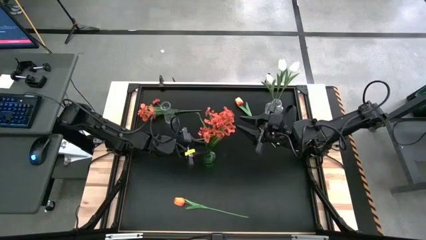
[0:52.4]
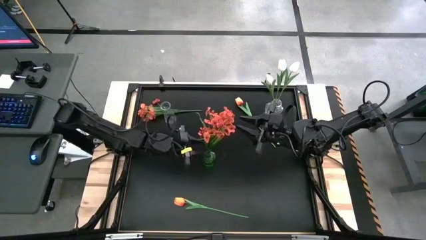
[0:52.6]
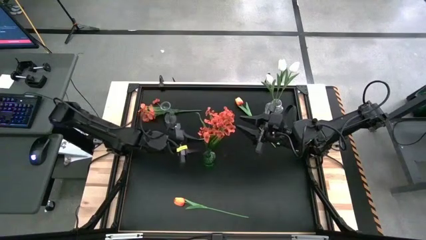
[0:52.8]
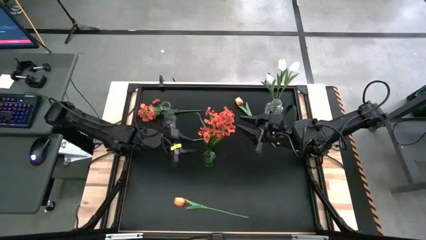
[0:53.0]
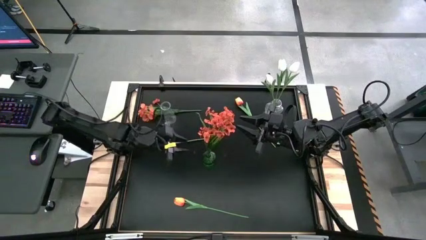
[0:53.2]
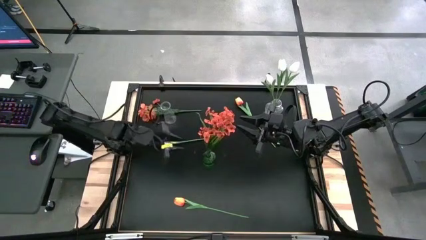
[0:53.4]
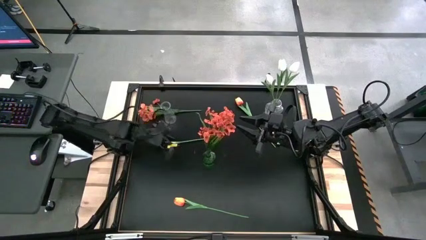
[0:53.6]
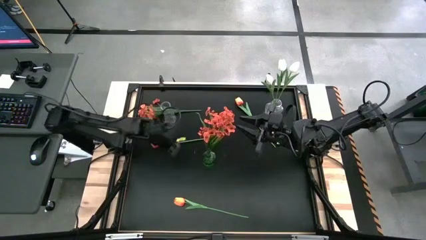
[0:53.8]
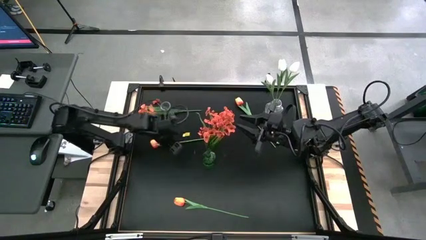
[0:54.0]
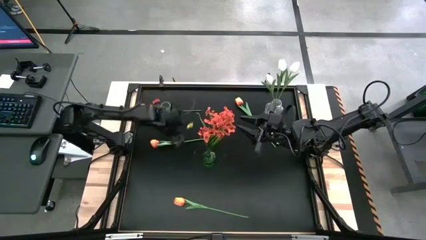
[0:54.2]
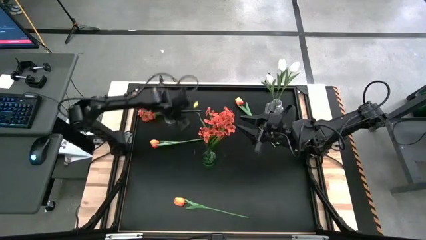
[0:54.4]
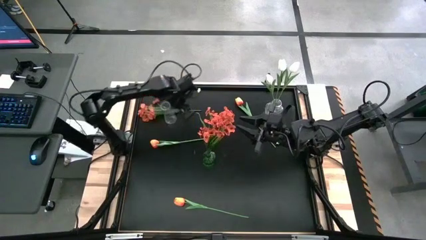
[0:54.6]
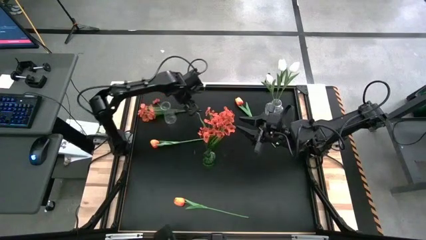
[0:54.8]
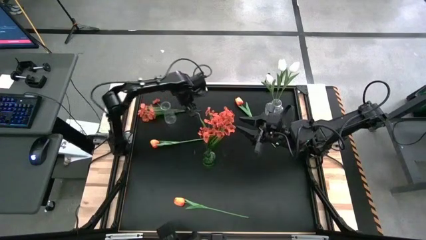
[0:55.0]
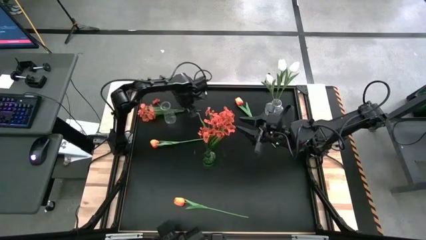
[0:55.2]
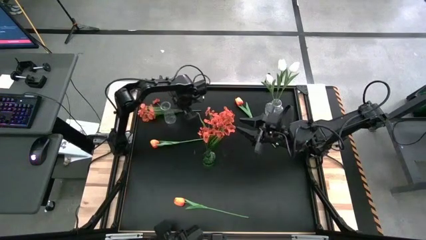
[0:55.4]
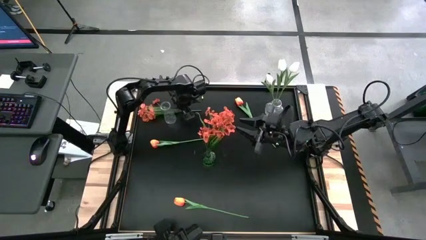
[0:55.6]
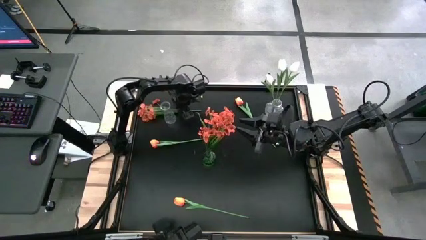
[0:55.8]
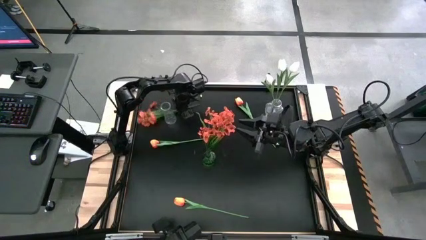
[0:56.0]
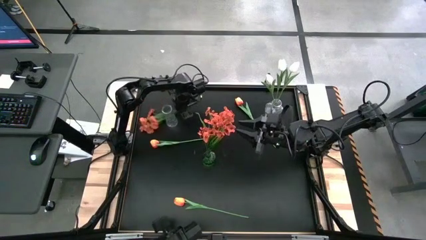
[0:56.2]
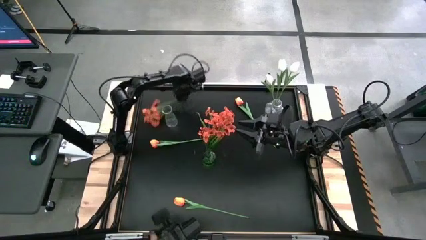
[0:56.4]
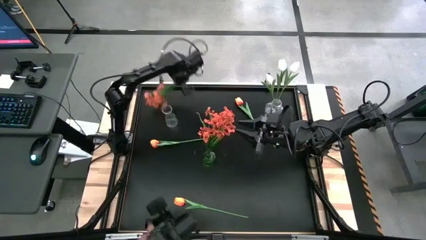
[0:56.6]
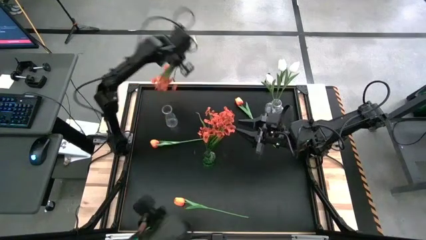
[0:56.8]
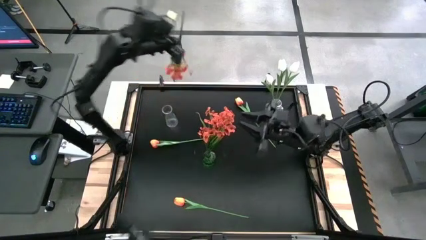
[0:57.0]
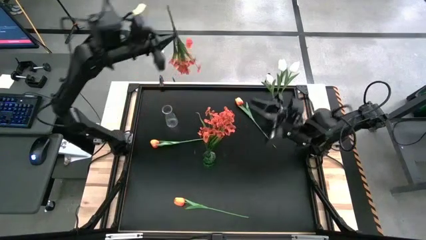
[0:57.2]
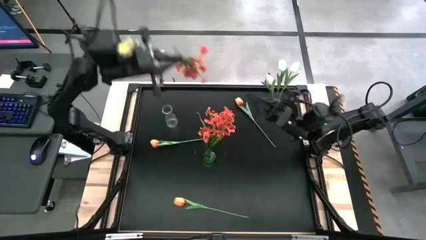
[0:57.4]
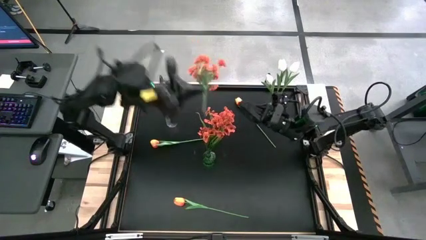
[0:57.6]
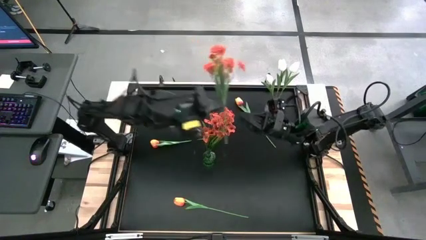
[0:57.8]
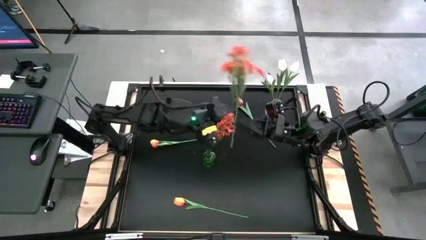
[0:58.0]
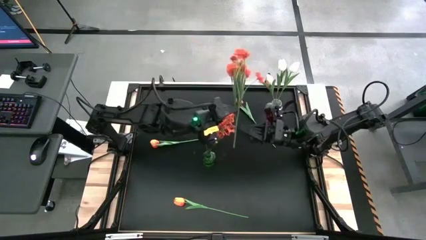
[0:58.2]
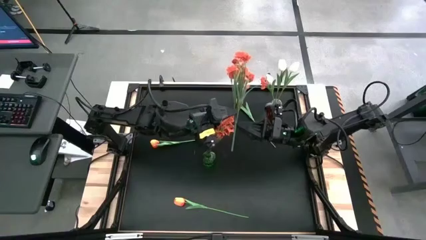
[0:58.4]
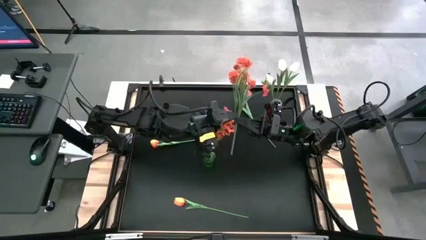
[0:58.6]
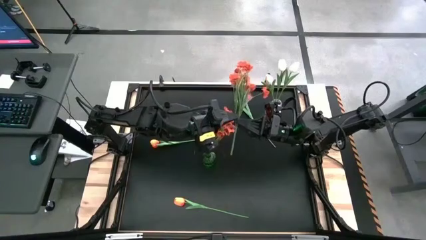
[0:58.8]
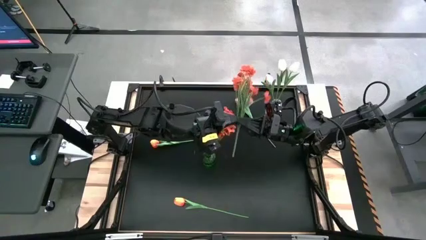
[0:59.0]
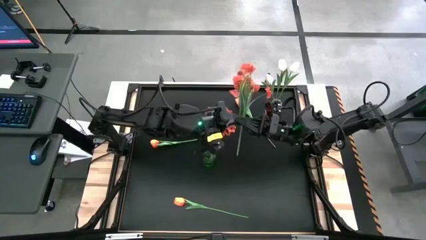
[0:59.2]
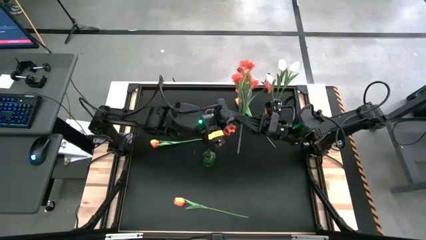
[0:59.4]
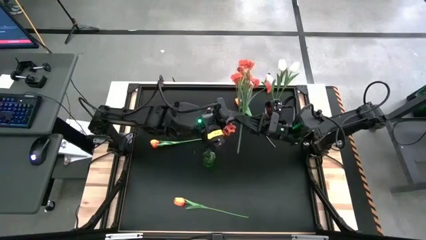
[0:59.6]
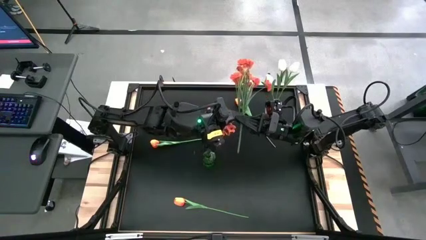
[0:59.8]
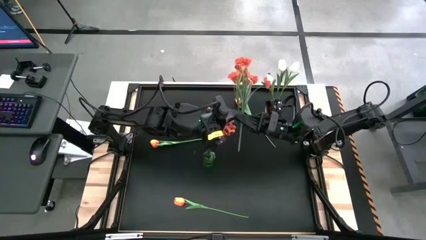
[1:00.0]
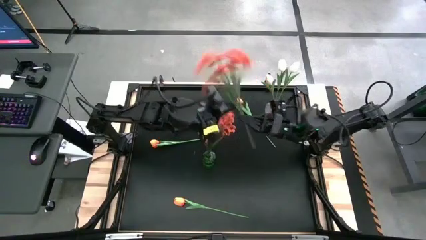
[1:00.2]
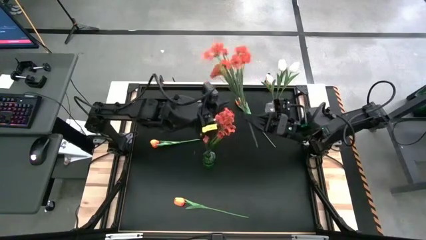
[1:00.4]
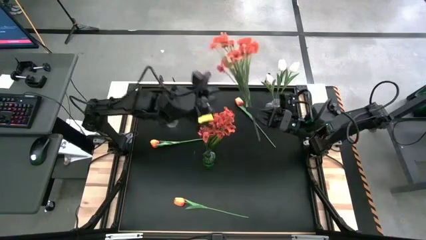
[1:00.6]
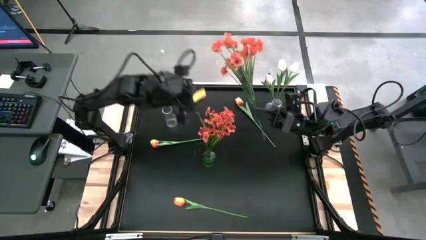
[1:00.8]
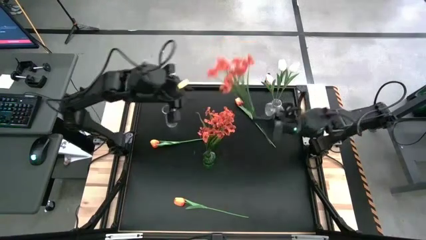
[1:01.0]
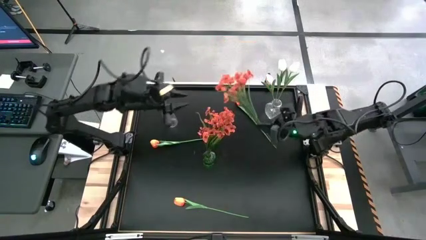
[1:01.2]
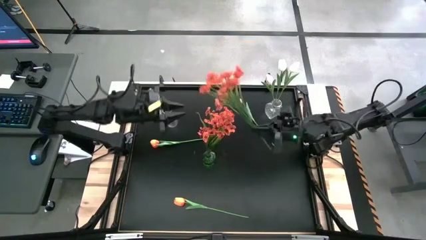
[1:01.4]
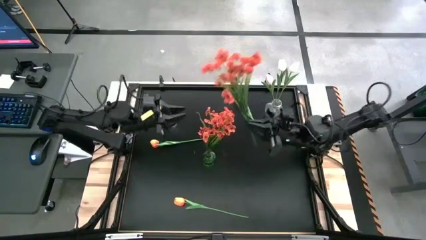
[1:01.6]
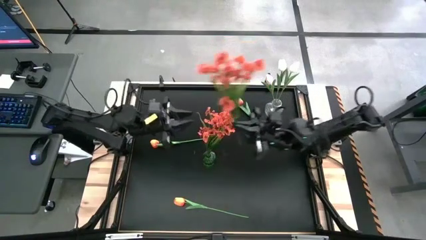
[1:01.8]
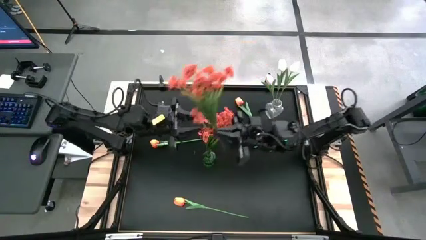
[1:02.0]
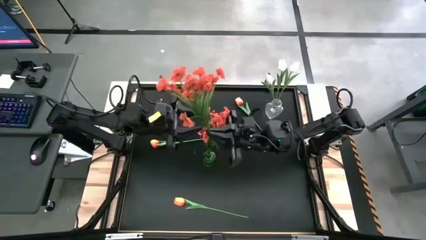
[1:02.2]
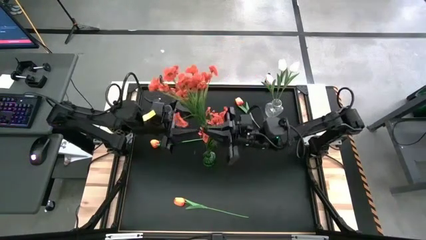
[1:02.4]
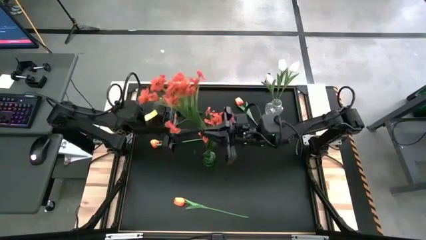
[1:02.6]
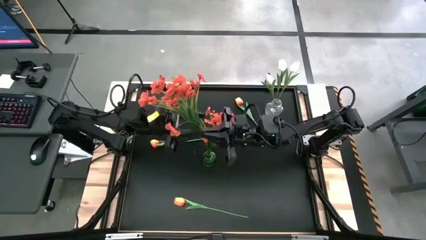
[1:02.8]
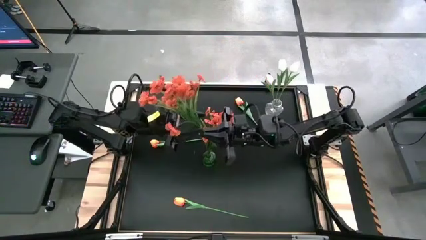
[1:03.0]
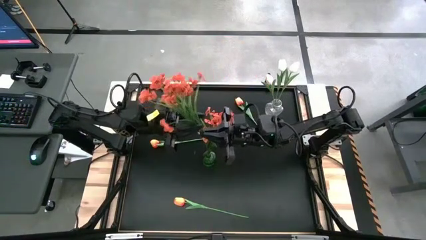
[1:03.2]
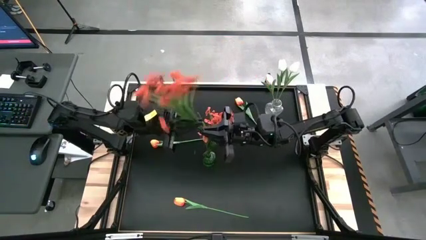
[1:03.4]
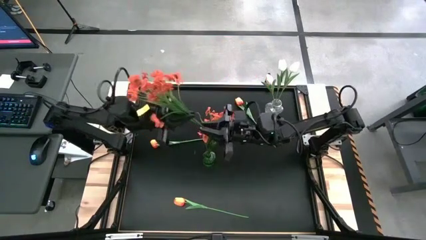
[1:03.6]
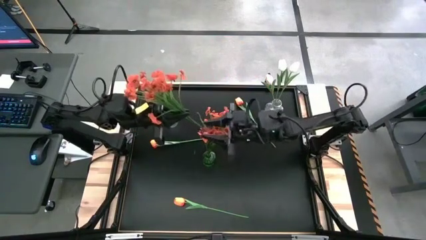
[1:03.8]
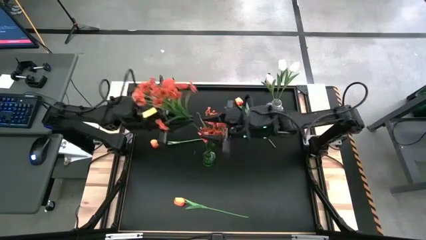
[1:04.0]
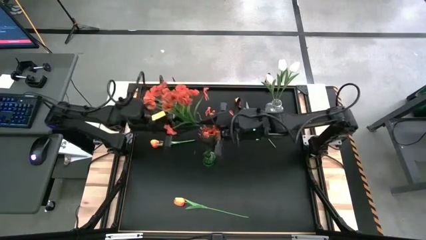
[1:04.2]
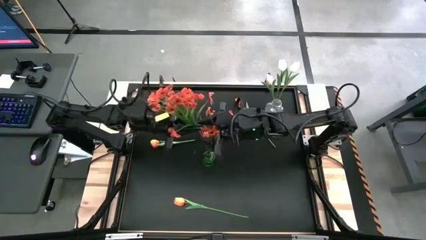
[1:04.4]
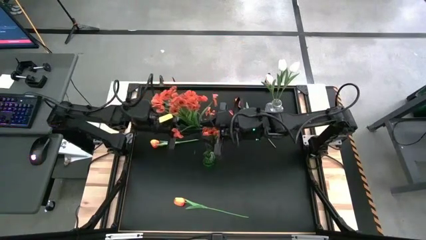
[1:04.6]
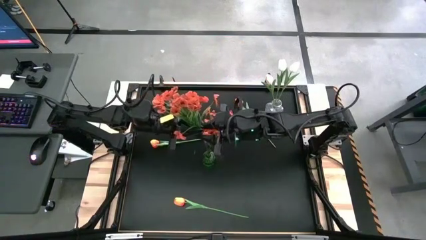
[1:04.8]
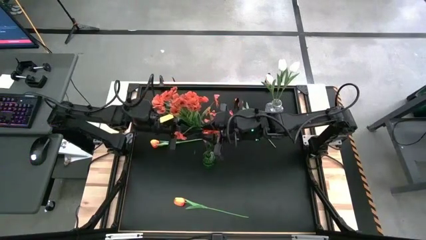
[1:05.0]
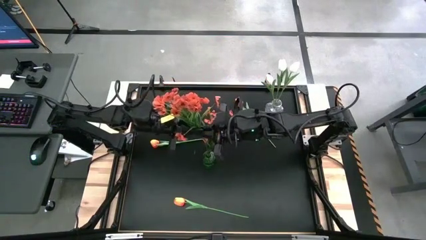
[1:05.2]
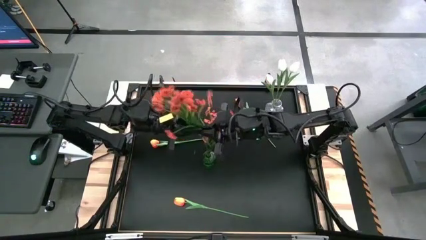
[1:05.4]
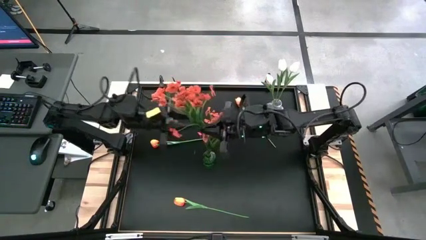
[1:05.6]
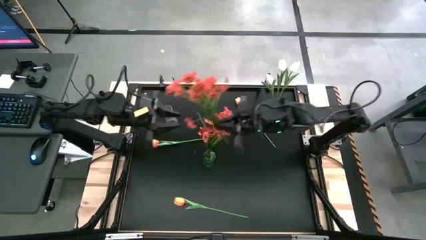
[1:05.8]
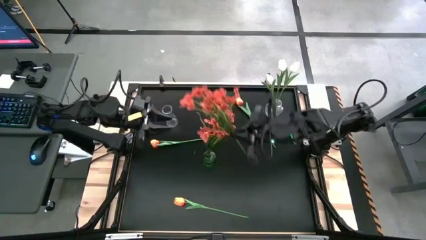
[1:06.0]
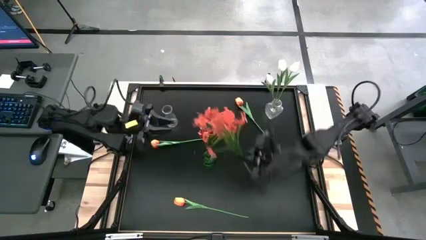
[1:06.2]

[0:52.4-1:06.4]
Task: Sort flowers into vase by color
Put the orange flowers into the green vase

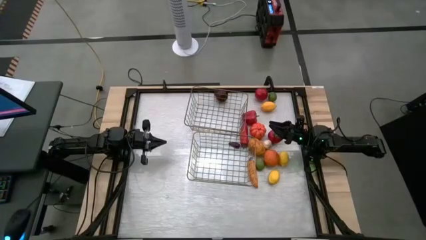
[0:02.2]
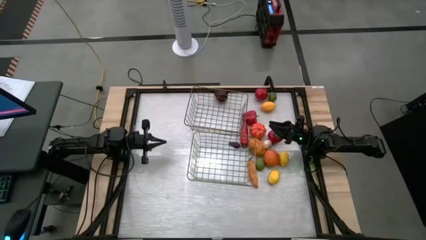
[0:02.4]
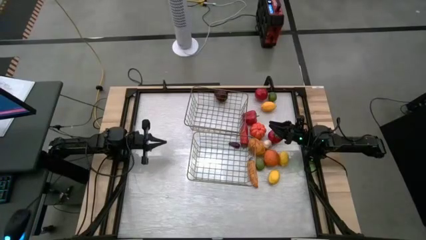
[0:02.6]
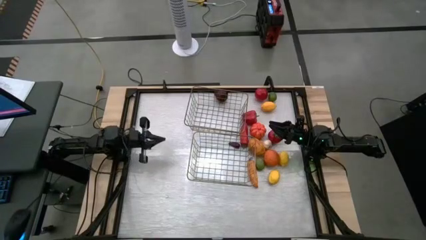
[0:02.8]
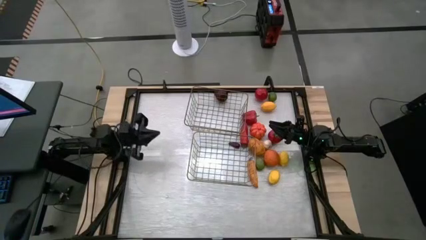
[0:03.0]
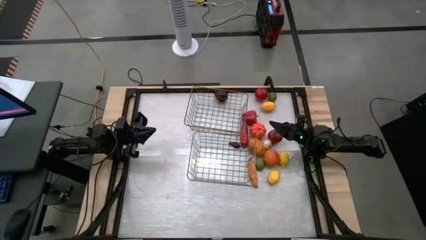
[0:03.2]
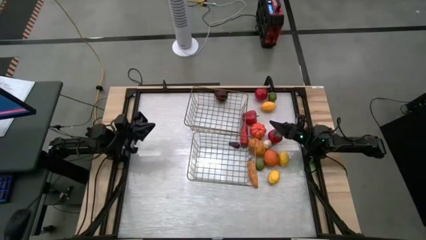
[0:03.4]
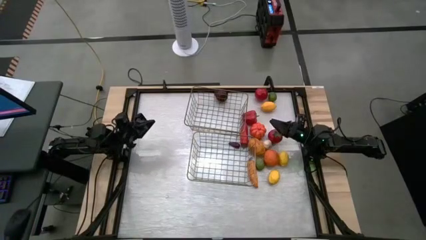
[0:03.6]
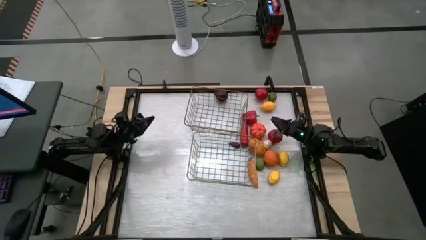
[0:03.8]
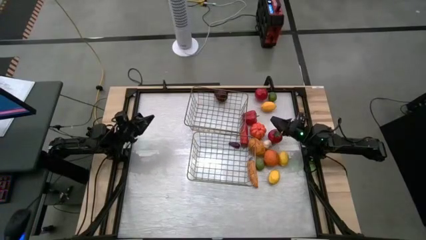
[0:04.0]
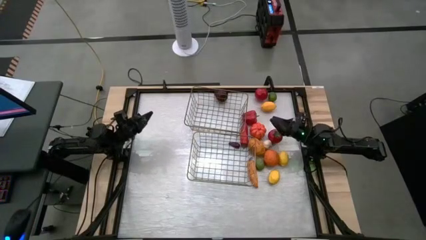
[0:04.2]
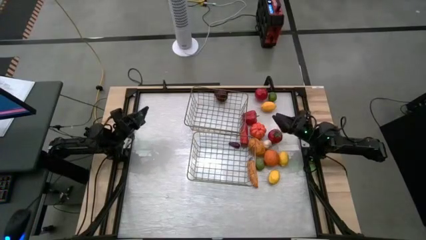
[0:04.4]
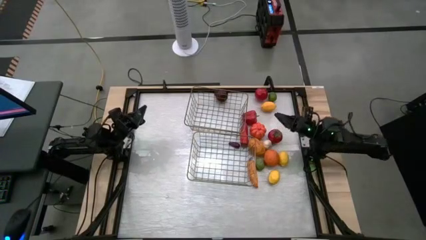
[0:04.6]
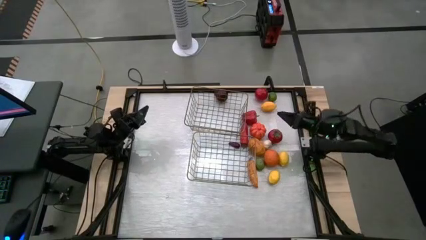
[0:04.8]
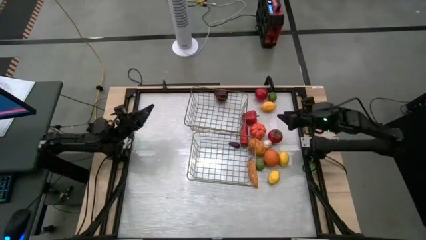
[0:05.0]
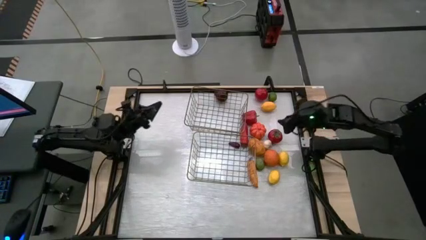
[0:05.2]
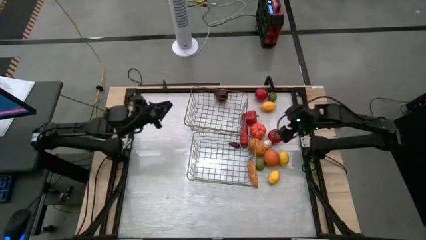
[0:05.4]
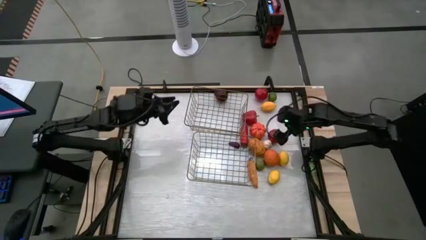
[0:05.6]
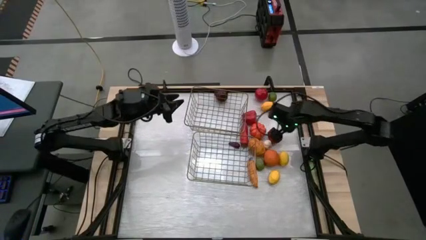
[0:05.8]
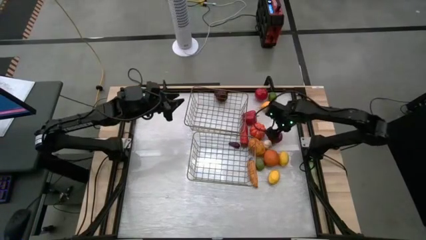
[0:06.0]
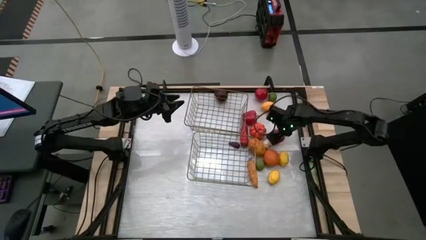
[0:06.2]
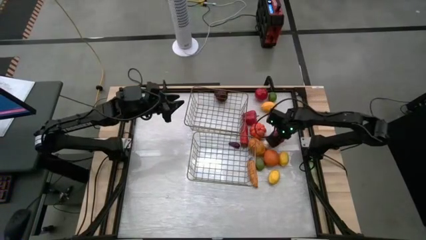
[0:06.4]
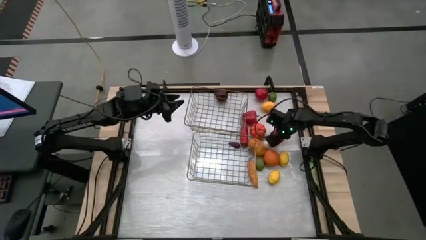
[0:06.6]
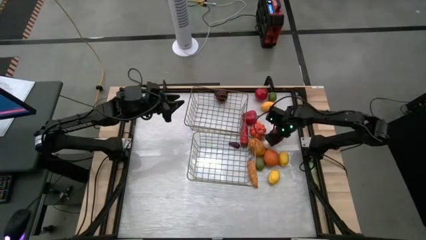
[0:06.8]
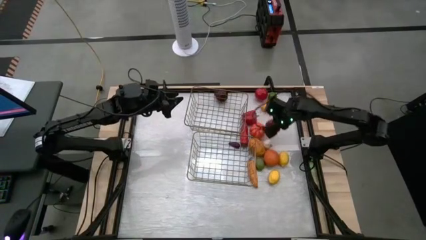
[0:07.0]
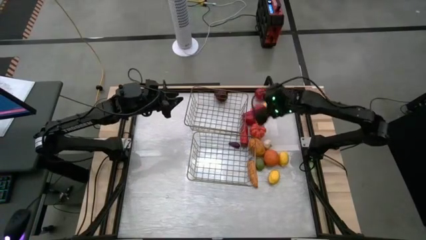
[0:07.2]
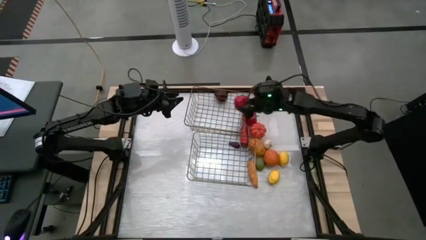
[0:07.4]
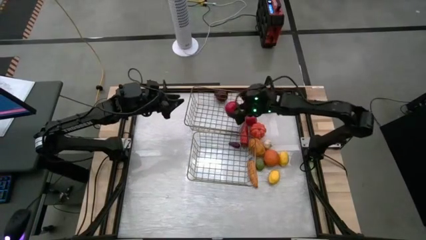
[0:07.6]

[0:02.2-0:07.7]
Task: Sort produce into baskets
Put the bottom red tomato fruit into the top wire basket
